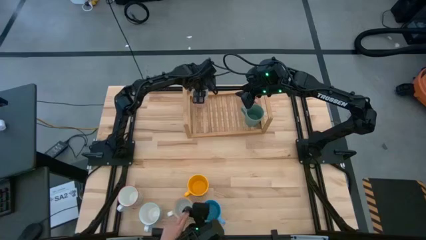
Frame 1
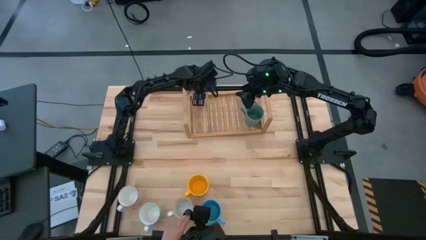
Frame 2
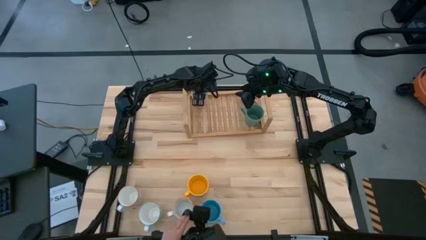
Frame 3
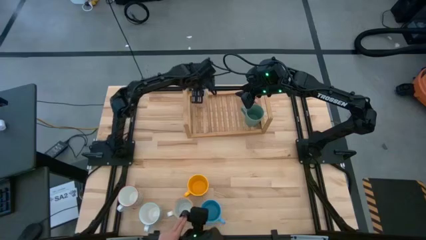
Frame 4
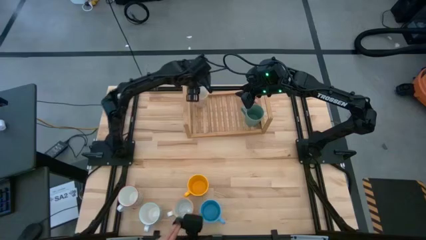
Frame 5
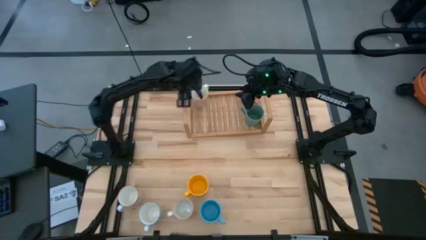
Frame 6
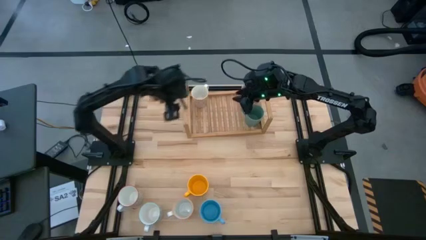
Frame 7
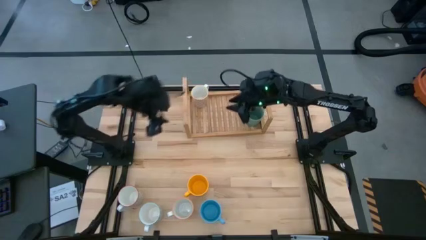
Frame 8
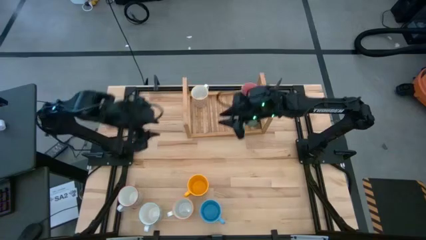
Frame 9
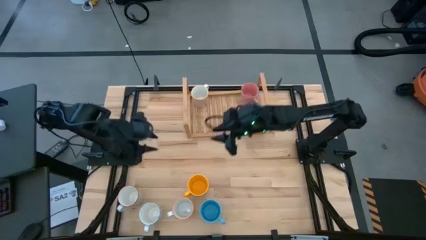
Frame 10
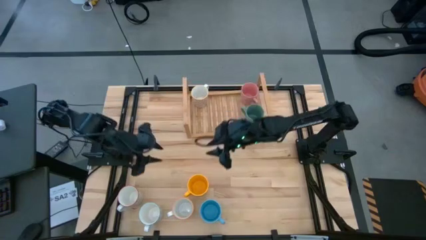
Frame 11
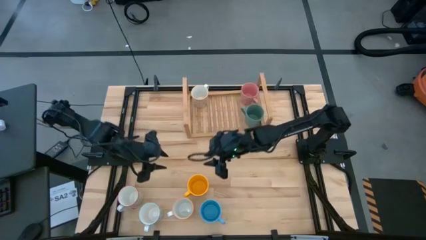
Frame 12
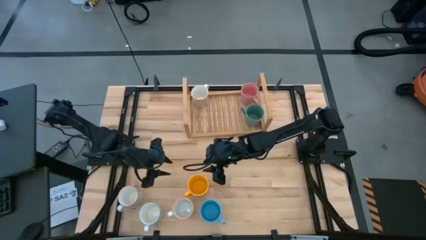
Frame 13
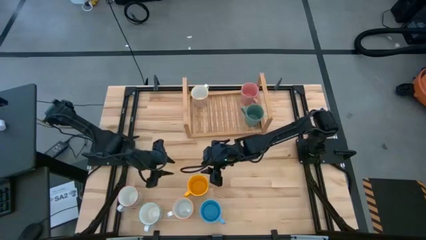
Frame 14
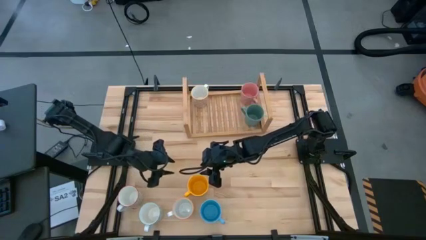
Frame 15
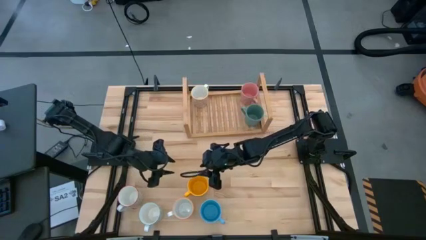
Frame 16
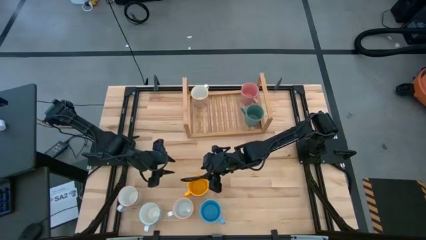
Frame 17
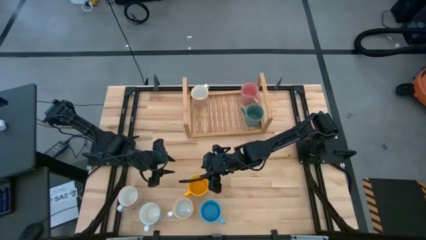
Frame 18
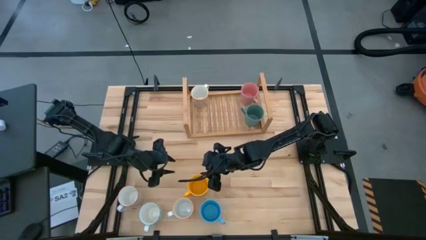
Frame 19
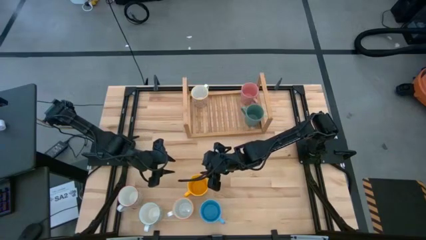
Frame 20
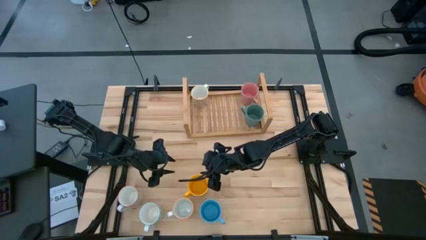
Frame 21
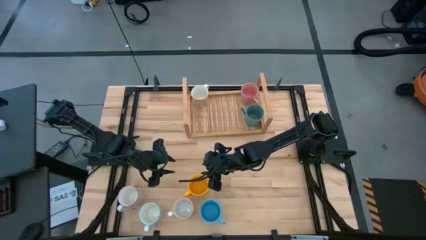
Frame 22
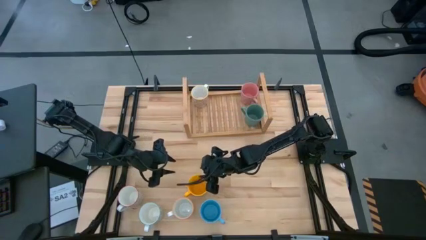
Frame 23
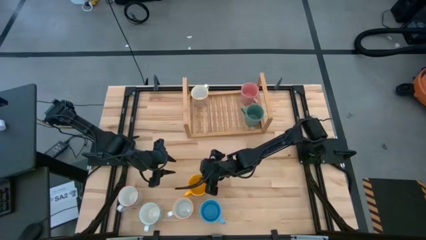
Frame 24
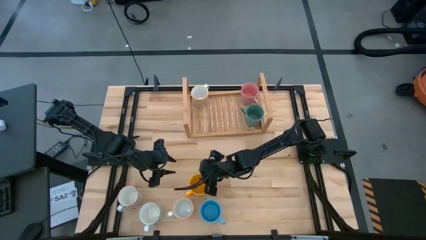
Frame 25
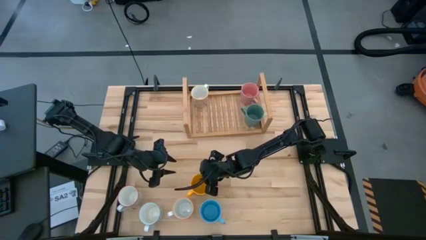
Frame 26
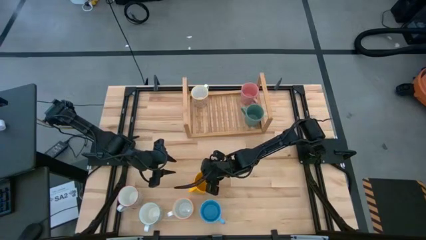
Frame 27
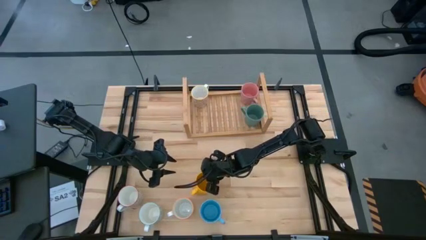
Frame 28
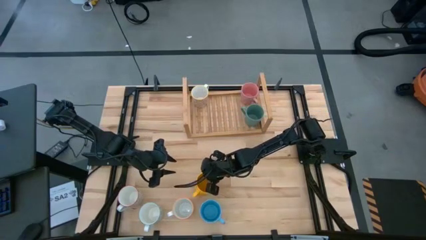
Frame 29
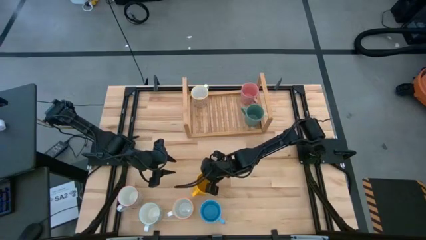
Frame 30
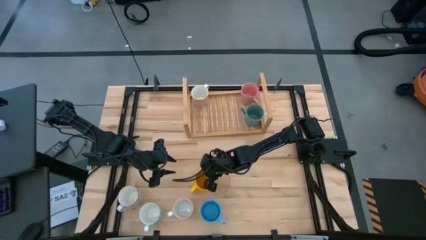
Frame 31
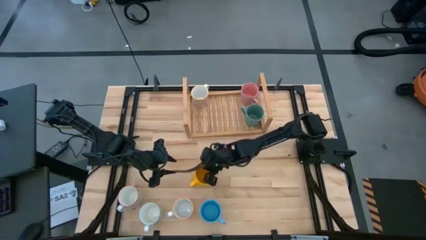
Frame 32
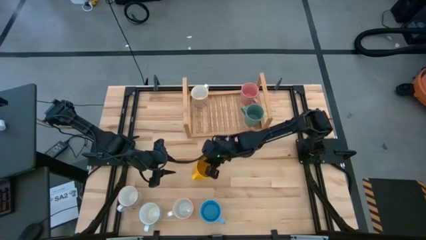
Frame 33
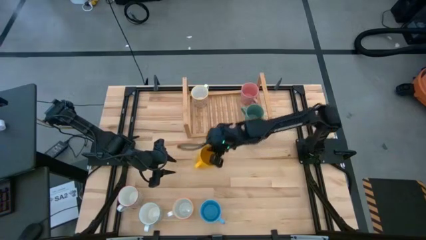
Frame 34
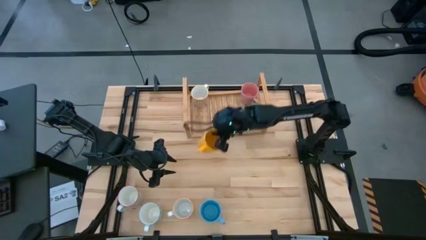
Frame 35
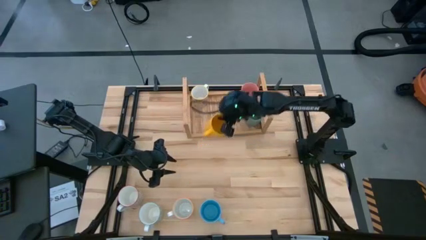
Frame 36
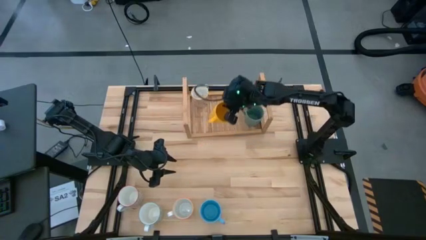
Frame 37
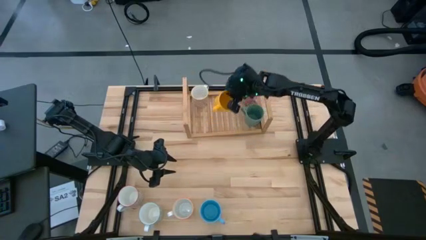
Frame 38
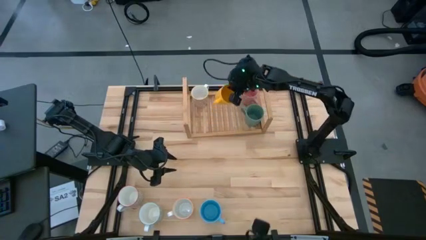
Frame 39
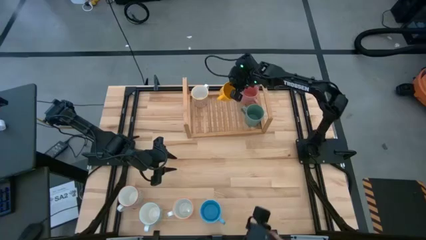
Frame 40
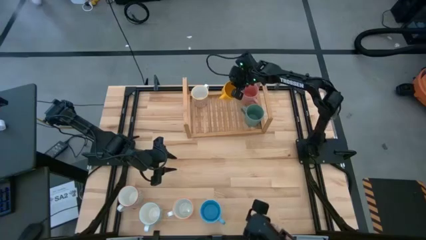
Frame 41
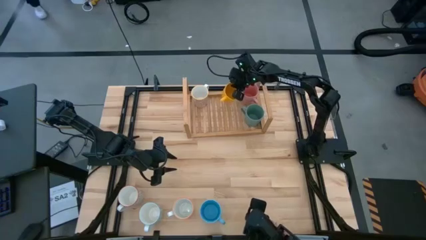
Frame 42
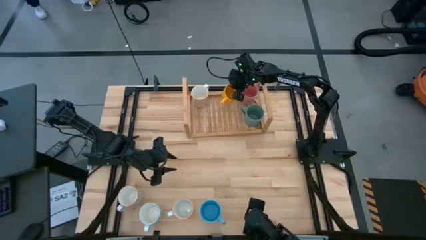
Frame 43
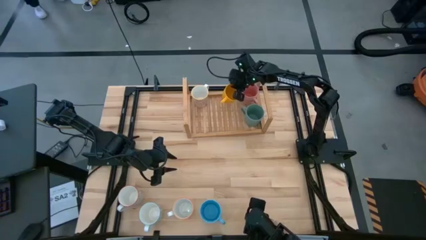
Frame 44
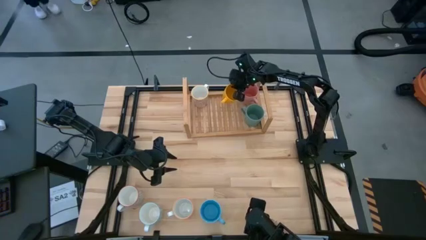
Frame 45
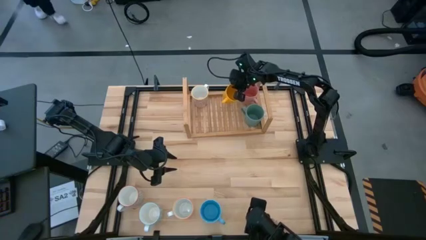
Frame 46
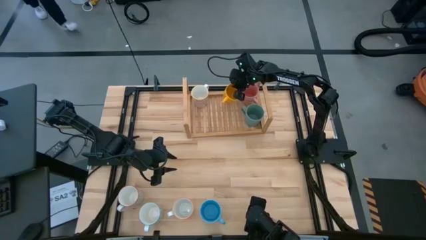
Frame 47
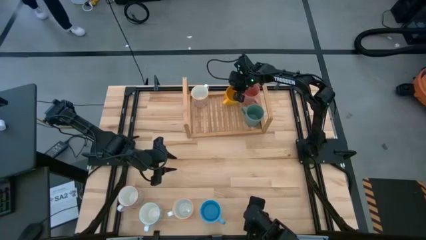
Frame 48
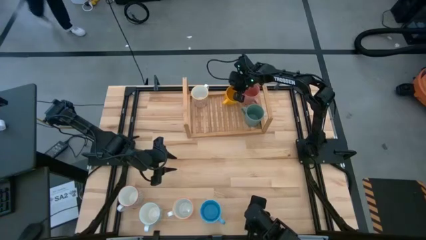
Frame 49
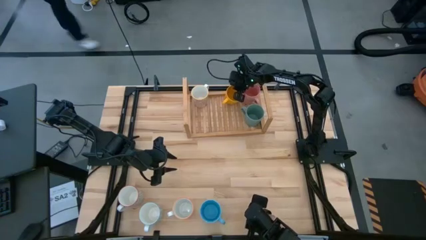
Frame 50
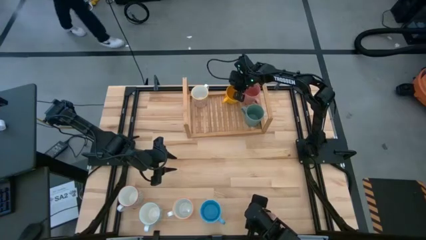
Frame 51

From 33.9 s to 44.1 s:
Task: Place coffee mugs
Put the yellow mug on the shelf

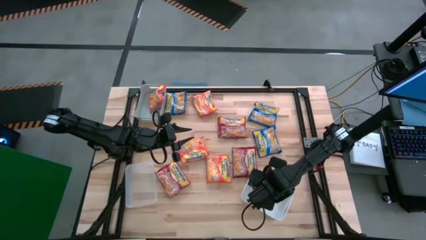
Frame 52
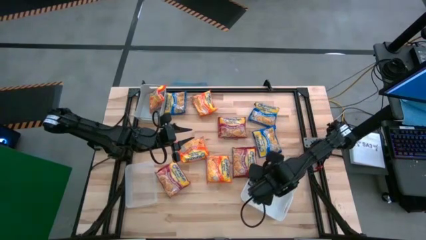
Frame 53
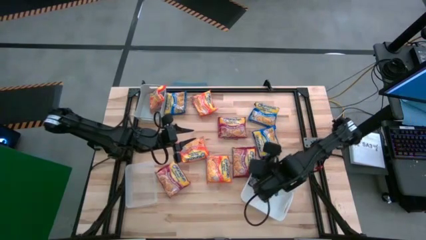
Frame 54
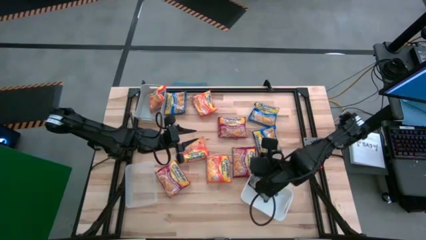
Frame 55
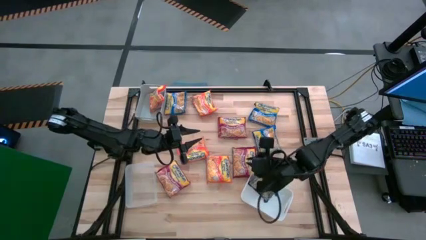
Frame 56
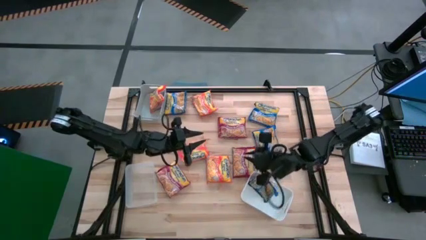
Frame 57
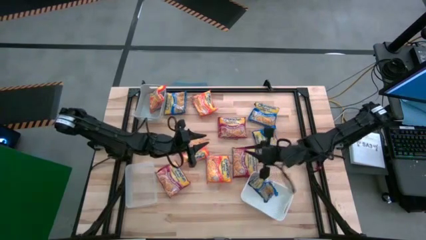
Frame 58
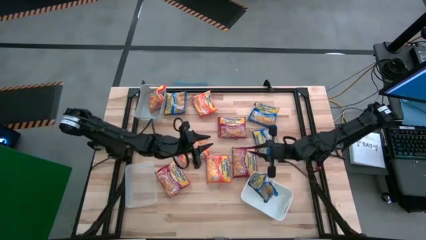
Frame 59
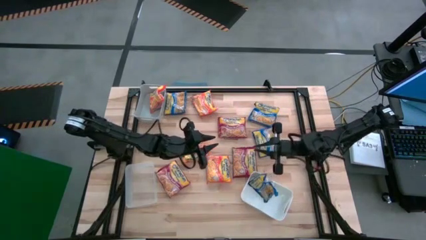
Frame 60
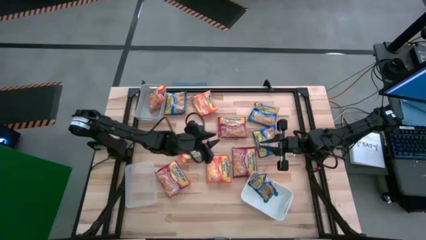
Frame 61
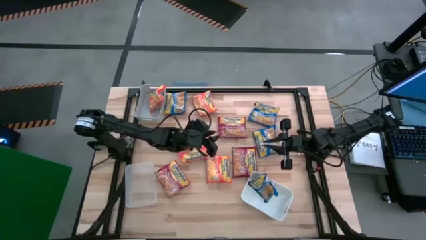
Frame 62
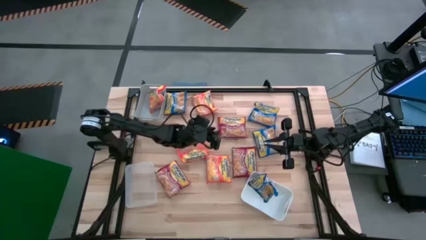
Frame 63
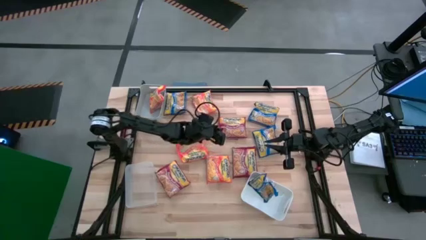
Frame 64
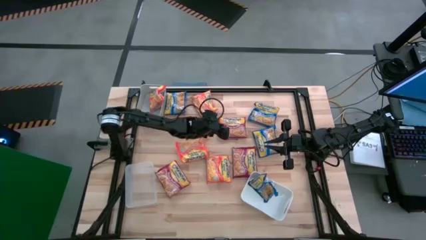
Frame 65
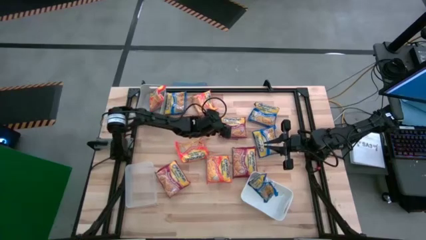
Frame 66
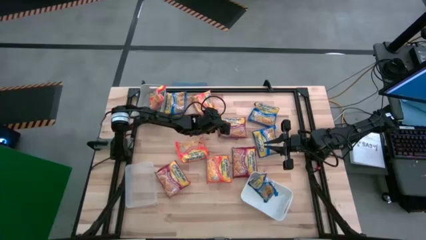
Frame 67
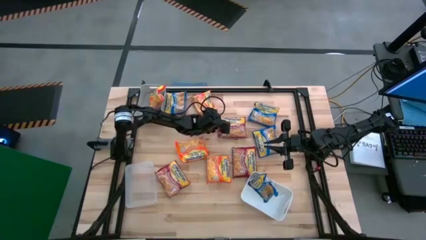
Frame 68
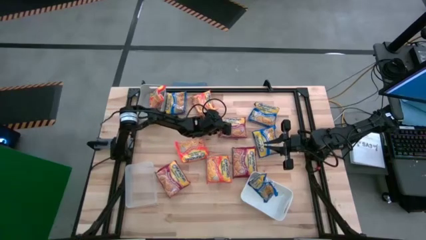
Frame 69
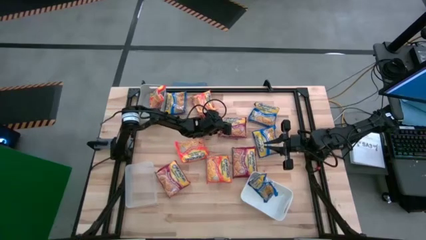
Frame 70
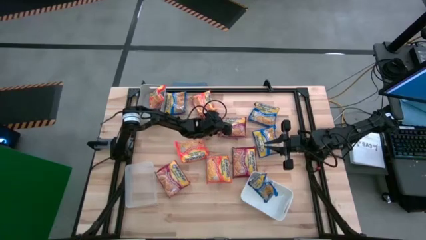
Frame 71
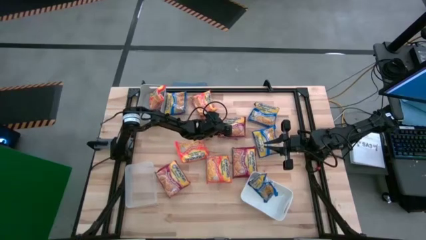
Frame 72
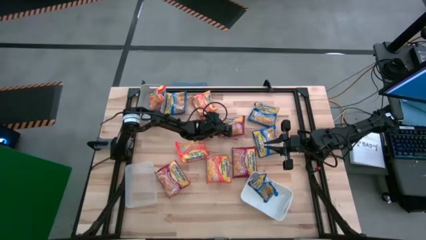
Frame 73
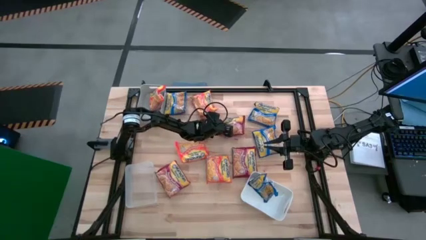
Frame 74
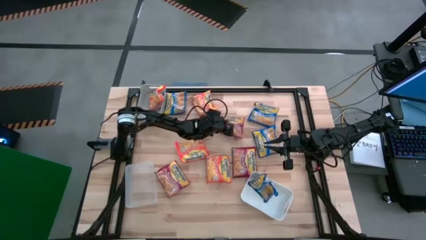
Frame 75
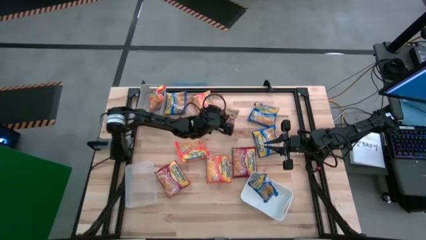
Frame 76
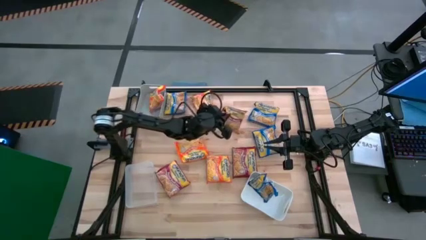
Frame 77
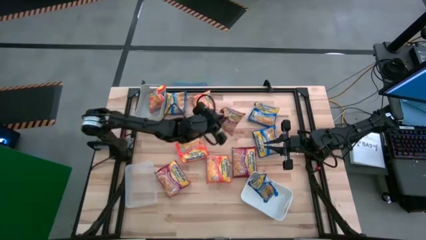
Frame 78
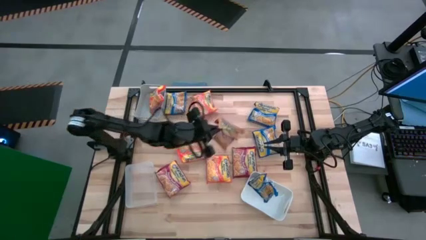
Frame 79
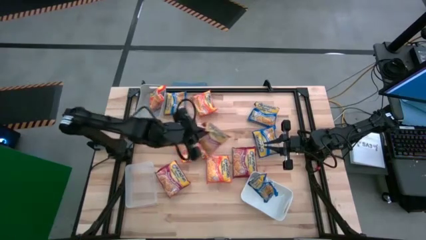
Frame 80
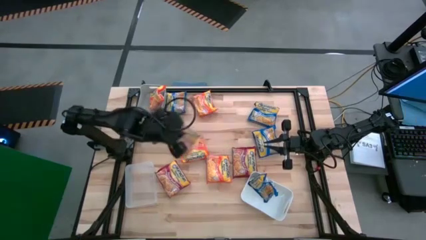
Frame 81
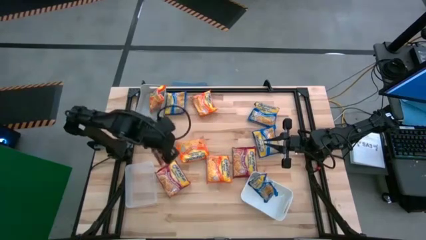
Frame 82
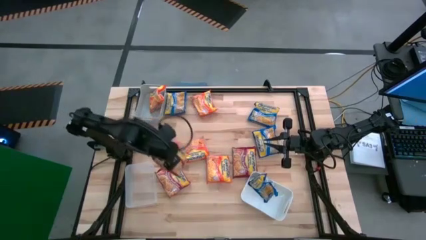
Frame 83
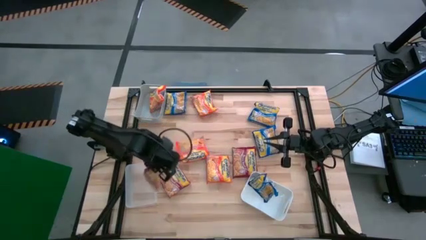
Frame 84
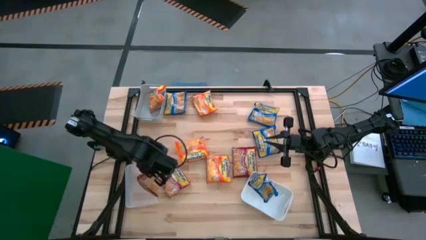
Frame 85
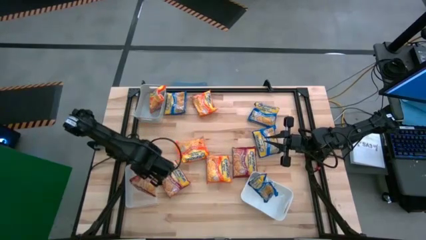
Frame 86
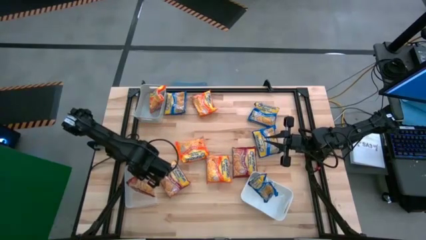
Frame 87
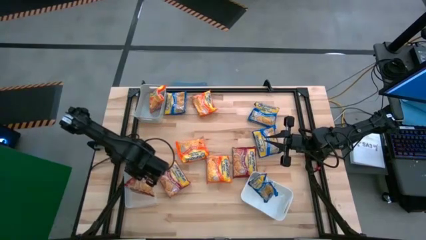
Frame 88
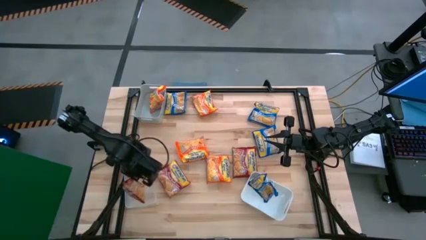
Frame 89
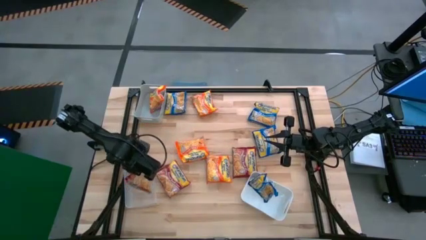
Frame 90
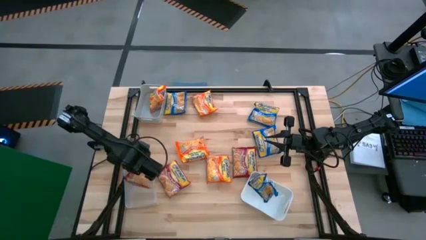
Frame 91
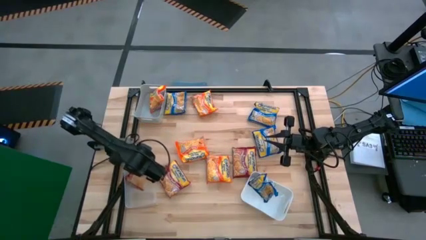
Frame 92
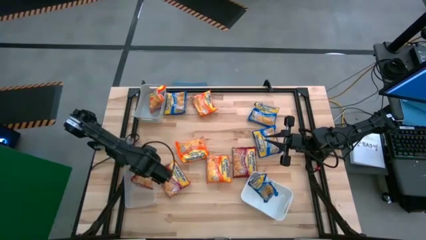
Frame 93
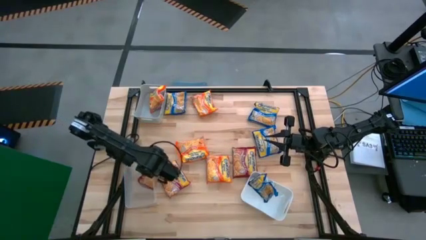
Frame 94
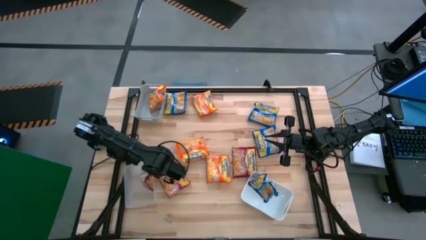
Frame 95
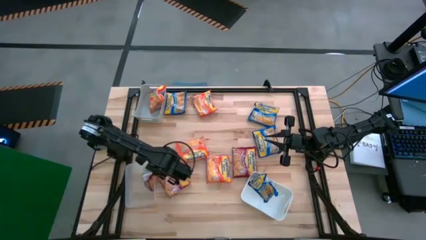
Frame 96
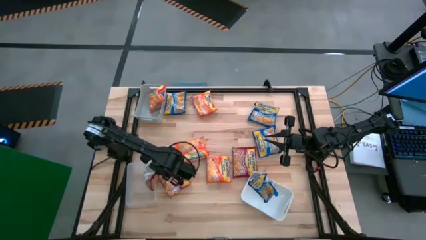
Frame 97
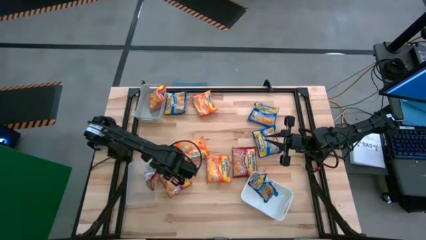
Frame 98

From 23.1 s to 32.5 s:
Task: Sort Maruchan noodles
Put the red noodle pack into the transparent bin
